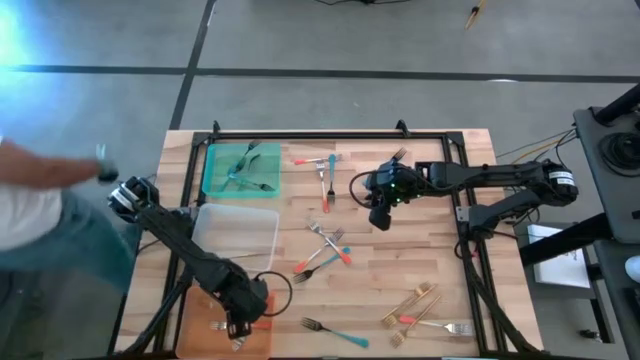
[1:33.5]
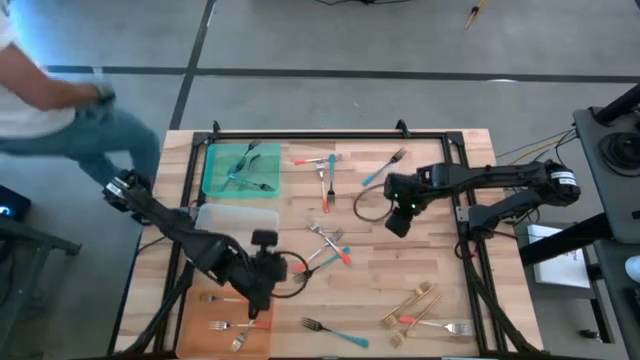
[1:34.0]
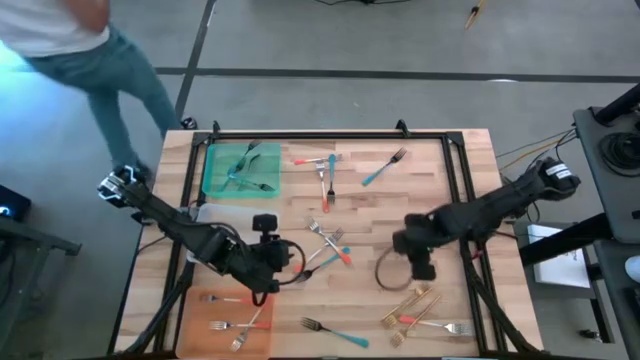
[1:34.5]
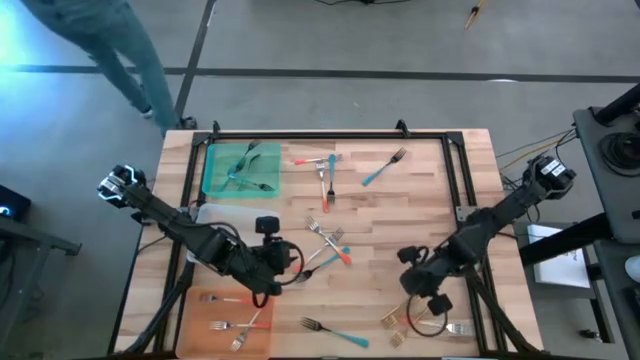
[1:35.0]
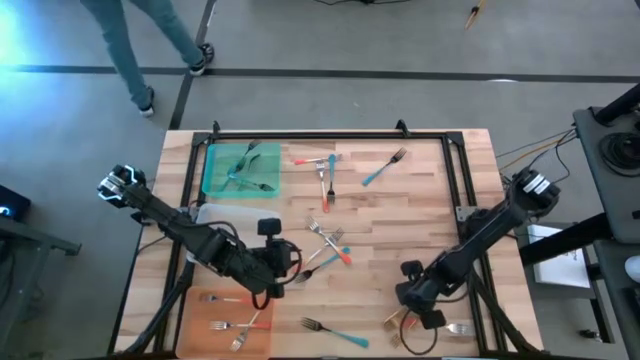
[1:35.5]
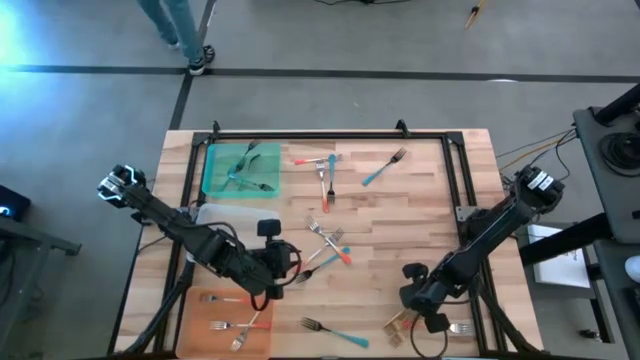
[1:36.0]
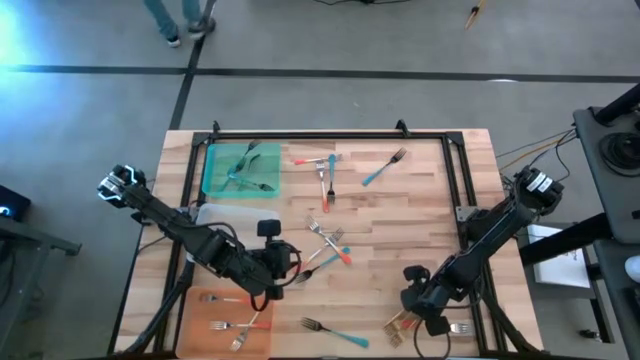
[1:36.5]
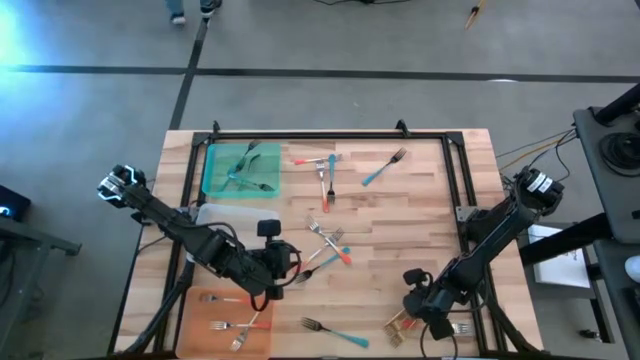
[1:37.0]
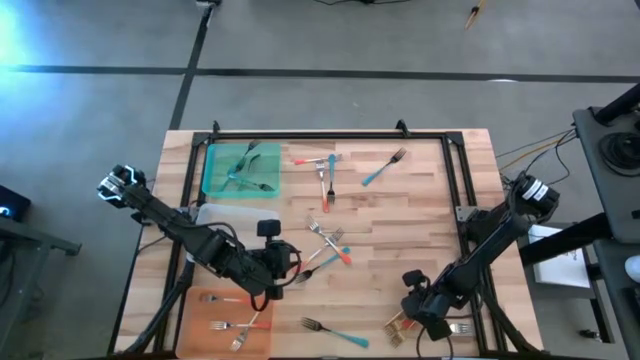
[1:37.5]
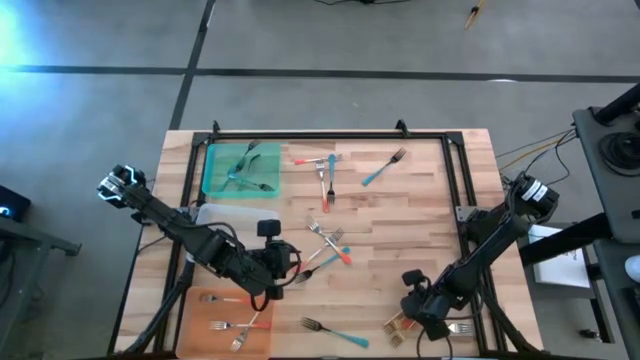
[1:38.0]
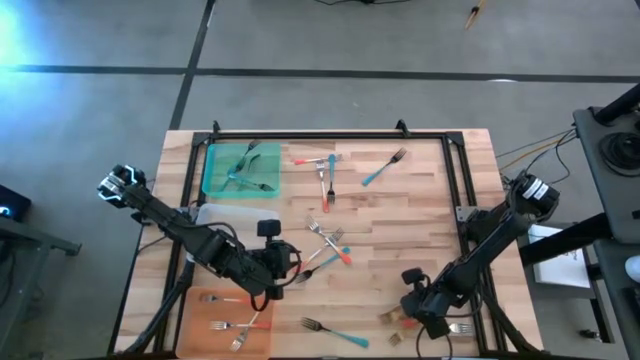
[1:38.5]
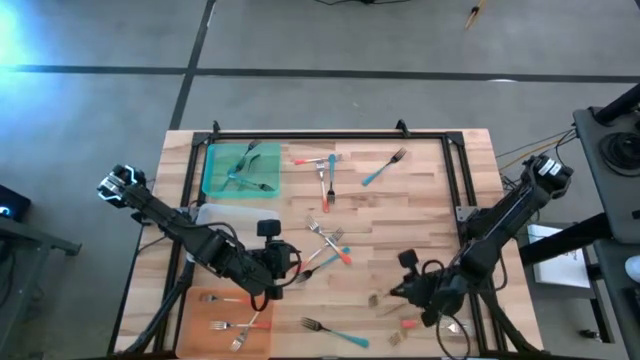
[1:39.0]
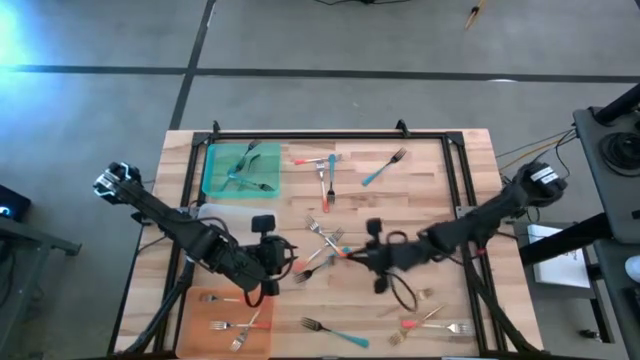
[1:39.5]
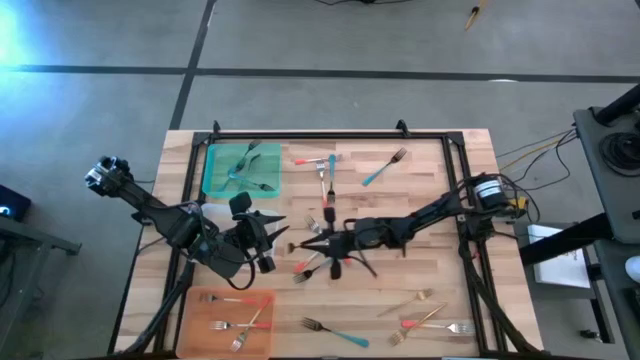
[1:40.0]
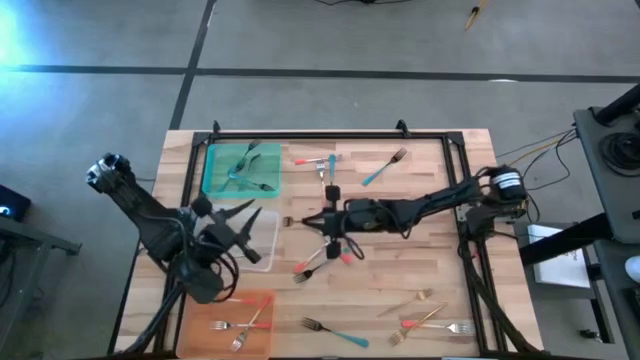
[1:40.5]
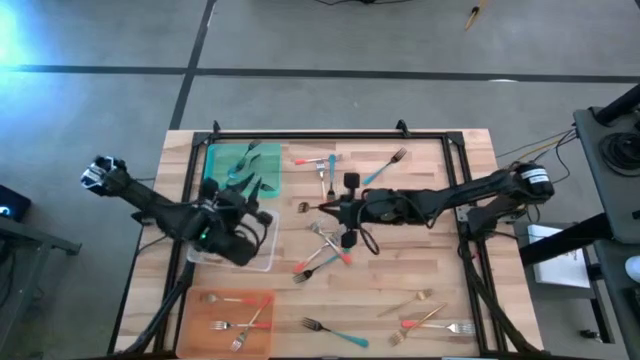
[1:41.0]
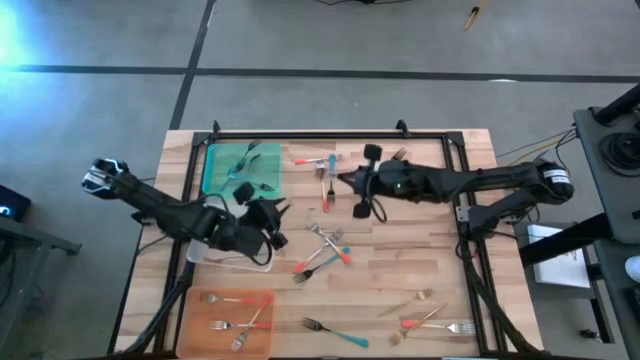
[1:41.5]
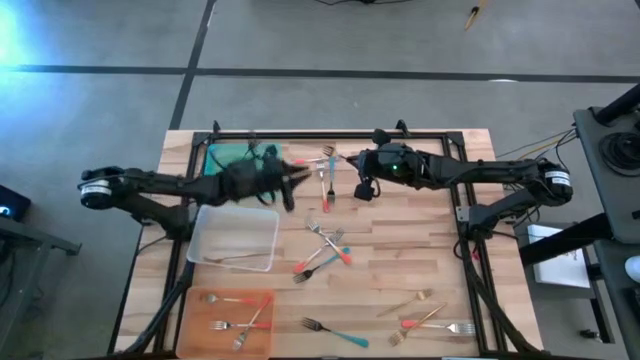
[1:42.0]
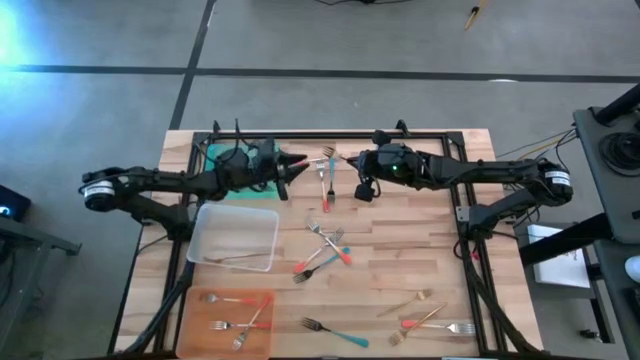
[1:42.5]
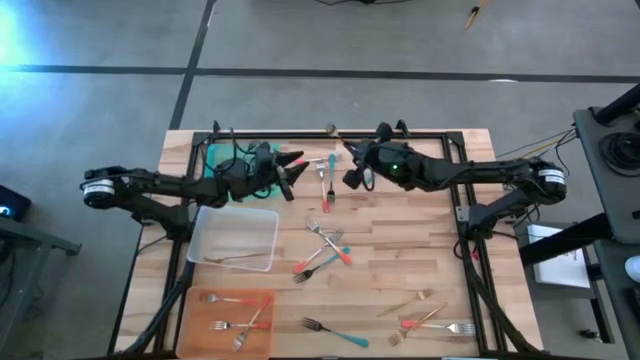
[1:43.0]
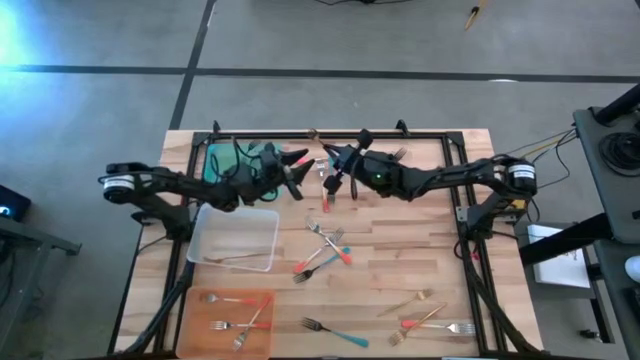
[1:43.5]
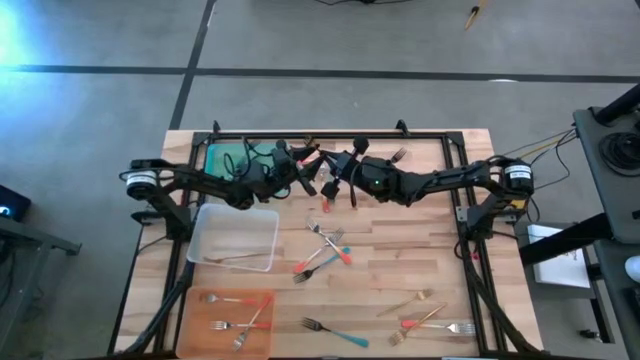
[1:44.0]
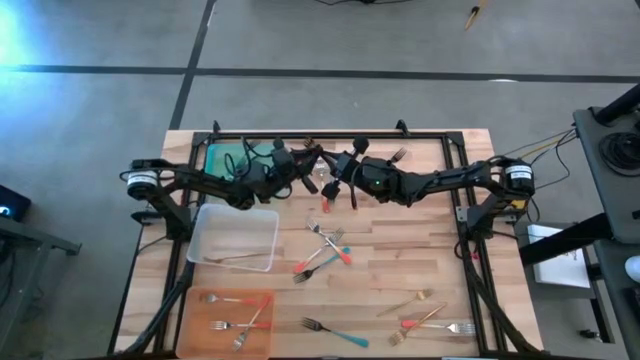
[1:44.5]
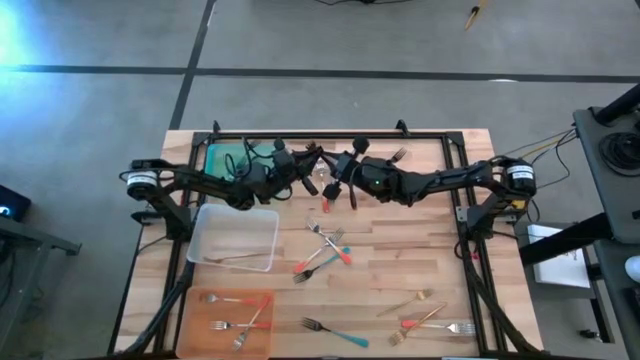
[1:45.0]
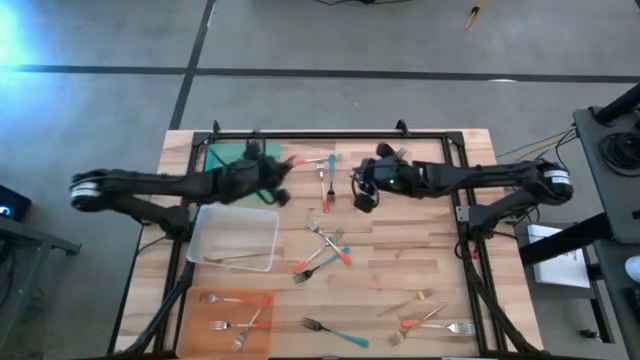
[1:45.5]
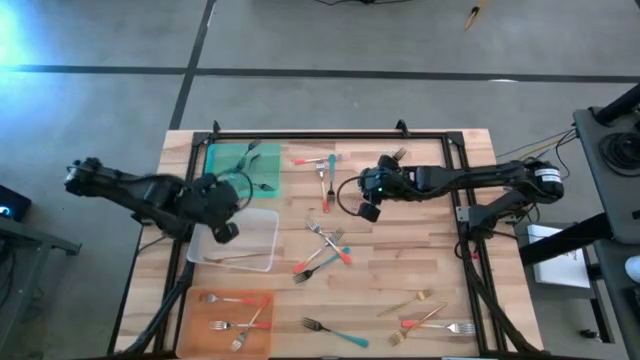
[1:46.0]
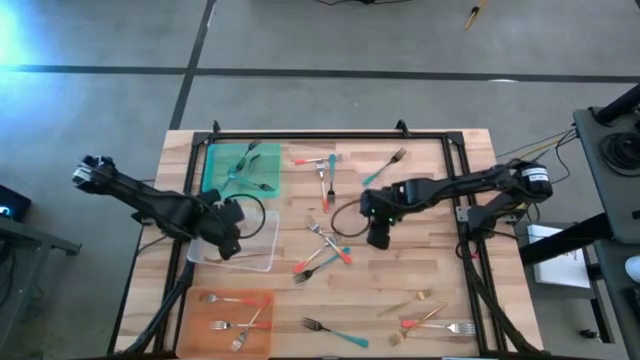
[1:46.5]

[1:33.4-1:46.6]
Task: Sort silverware by color (type)
Put the gold fork into the transparent bin

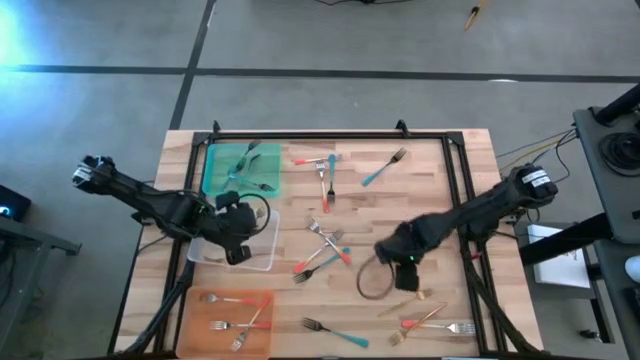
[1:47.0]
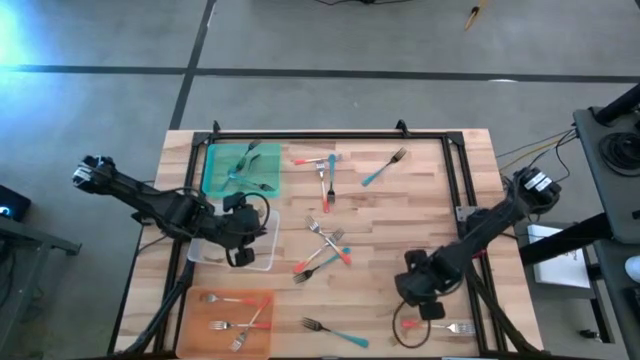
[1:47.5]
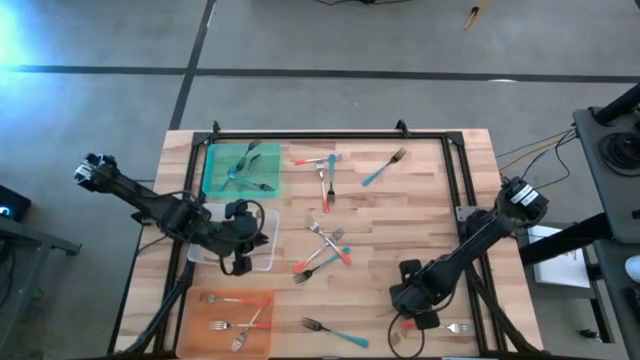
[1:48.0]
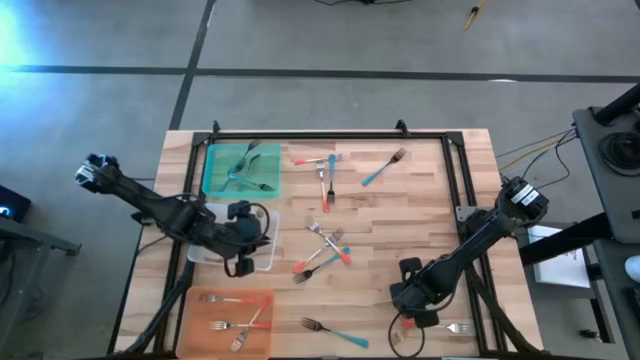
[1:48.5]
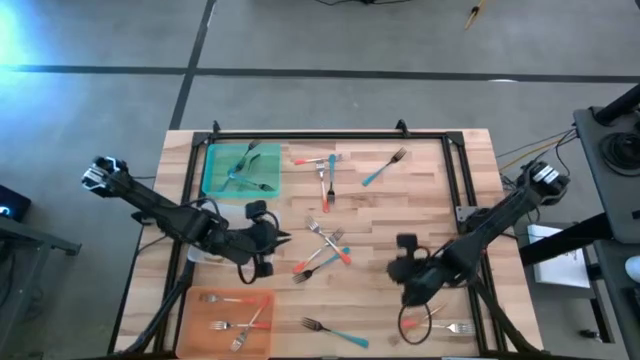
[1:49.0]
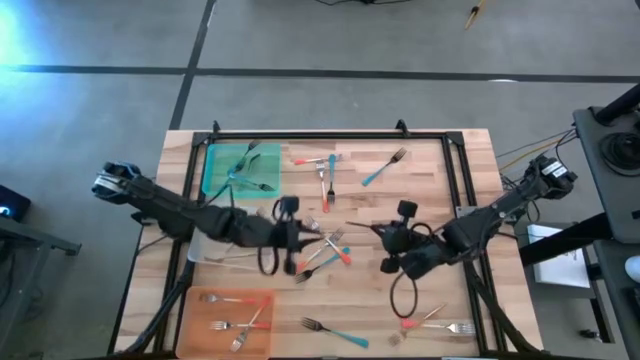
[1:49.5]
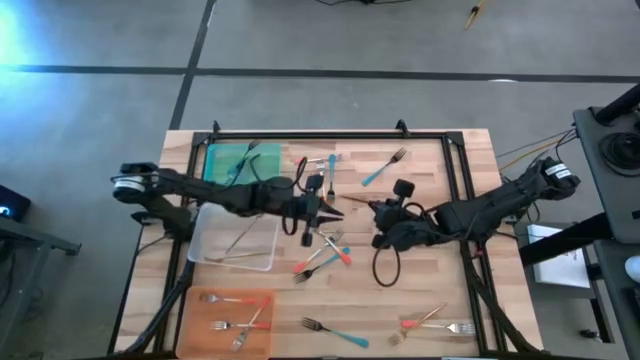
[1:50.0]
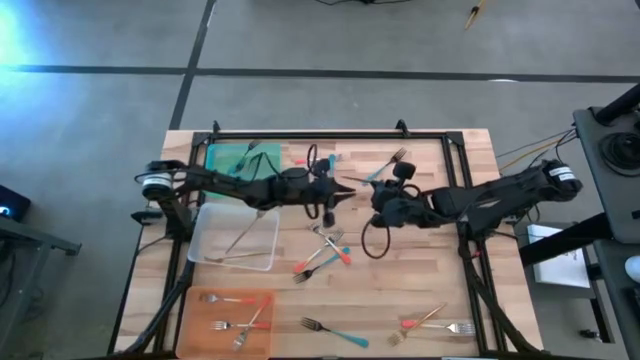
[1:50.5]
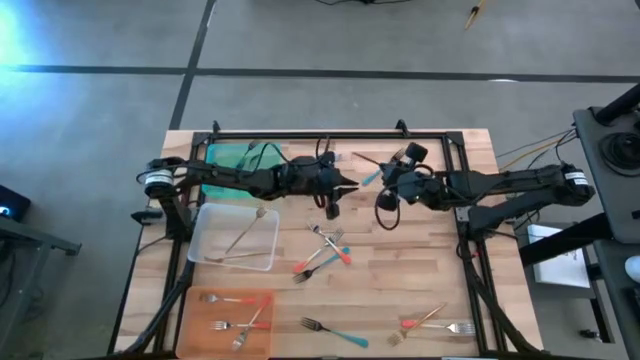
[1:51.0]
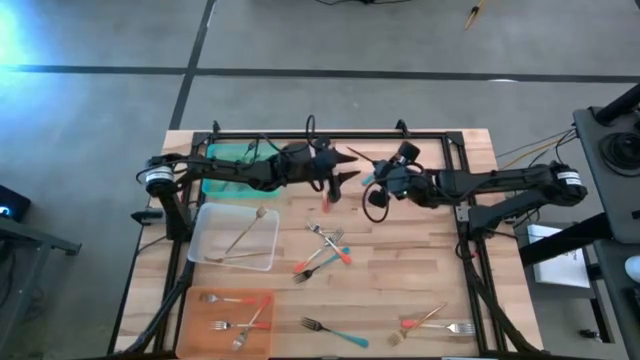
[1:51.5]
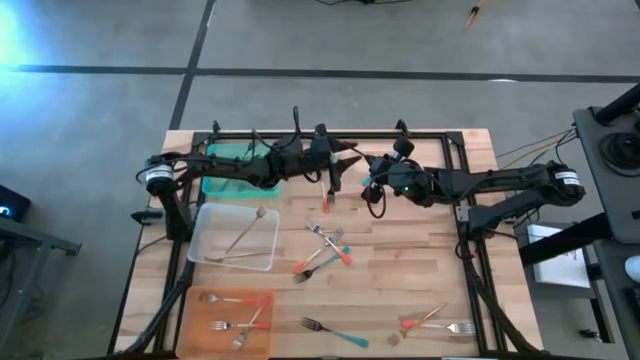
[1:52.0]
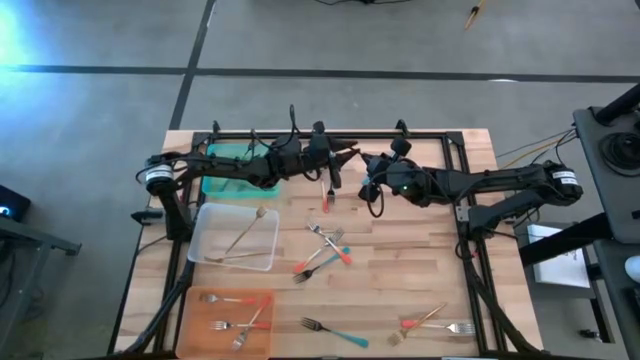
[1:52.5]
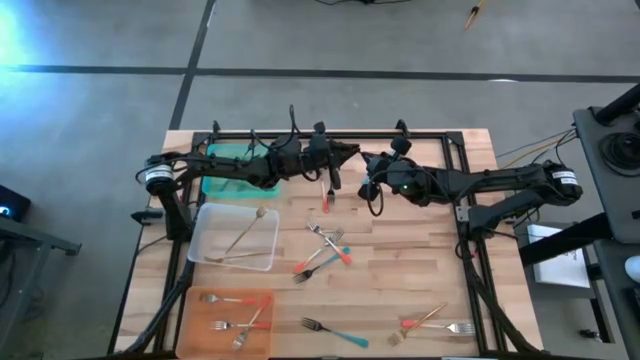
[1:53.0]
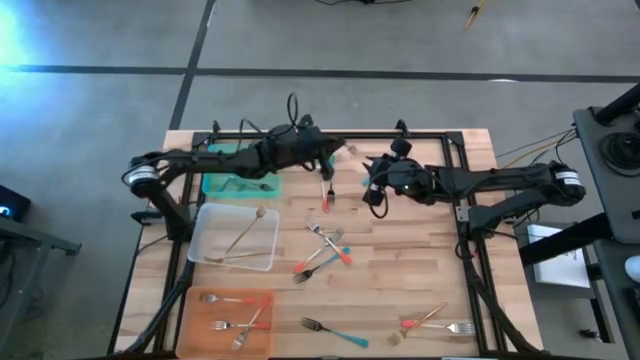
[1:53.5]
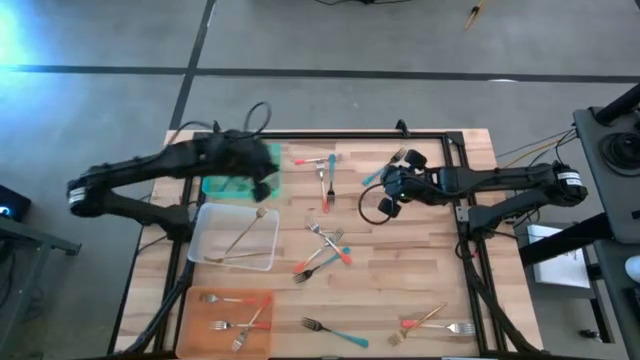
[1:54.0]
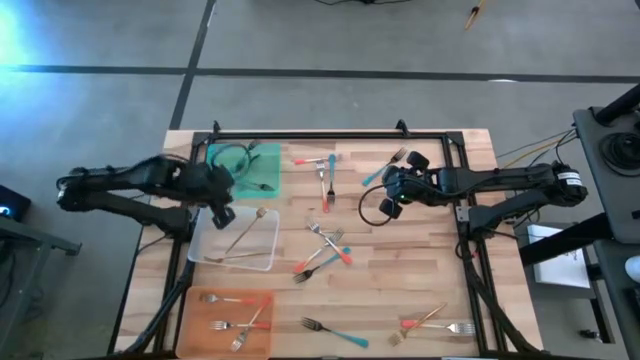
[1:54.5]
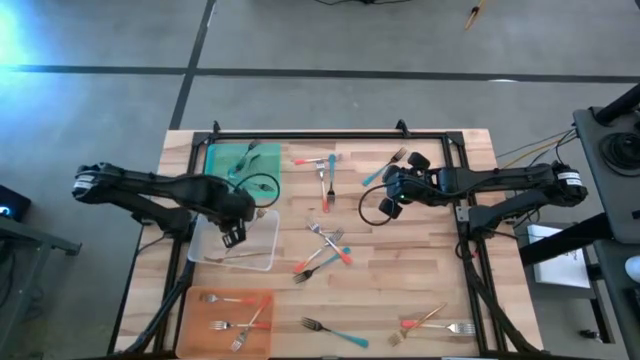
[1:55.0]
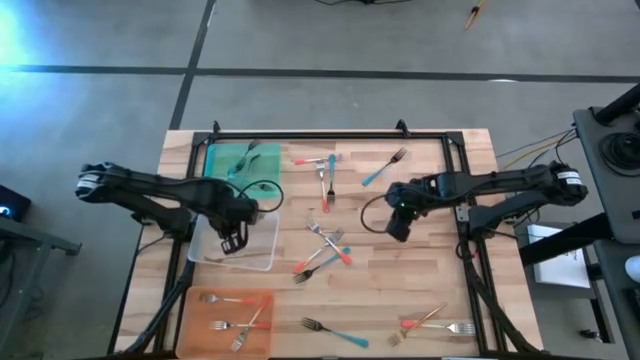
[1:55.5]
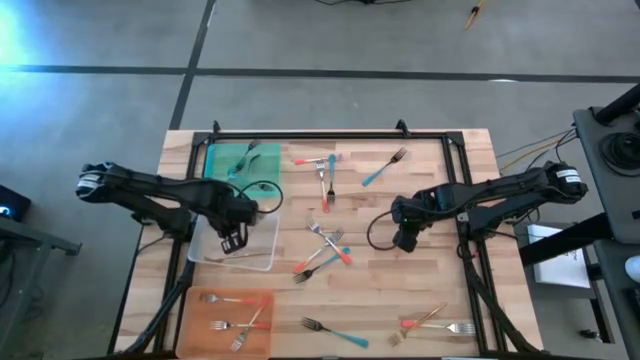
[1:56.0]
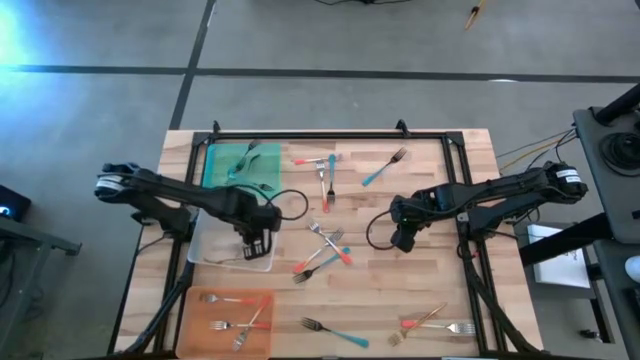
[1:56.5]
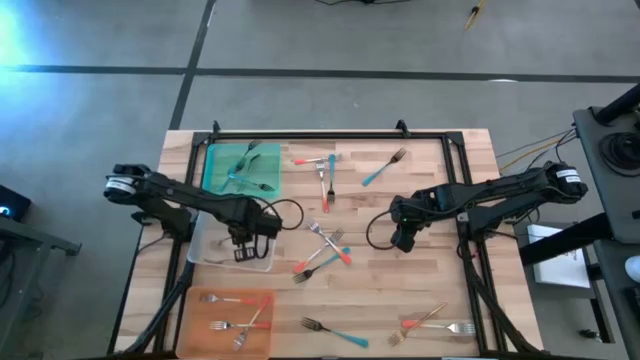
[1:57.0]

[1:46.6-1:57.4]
Put the gold fork into the transparent bin
